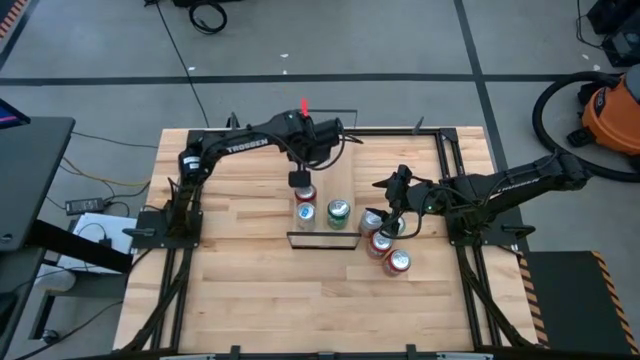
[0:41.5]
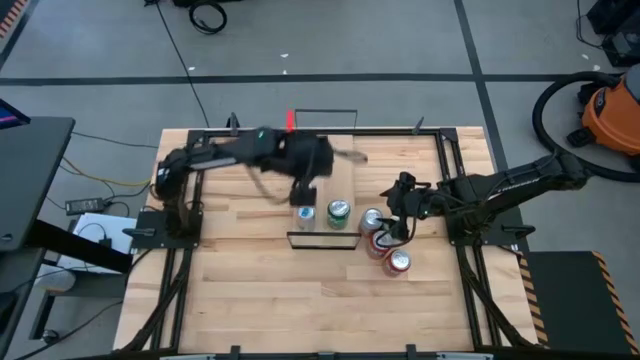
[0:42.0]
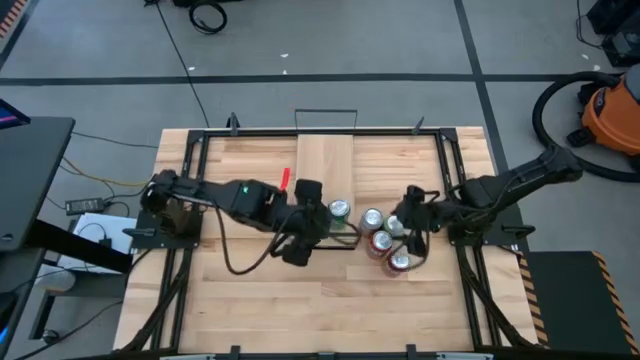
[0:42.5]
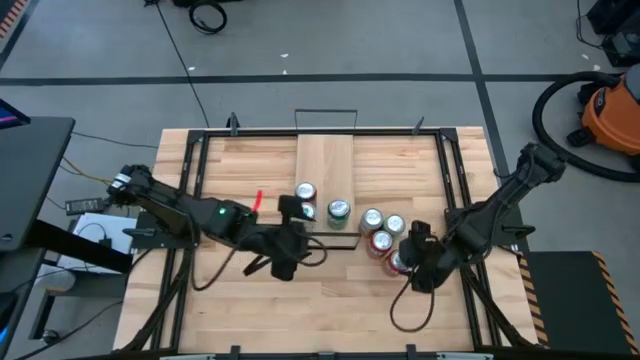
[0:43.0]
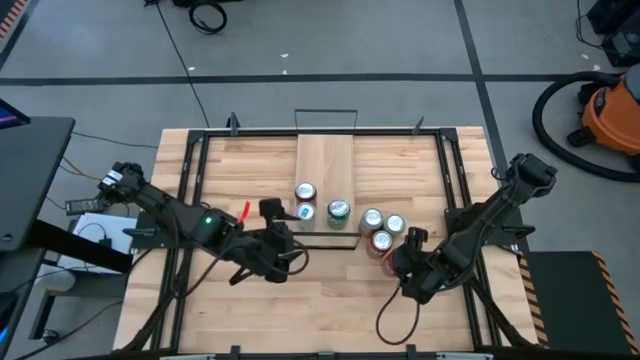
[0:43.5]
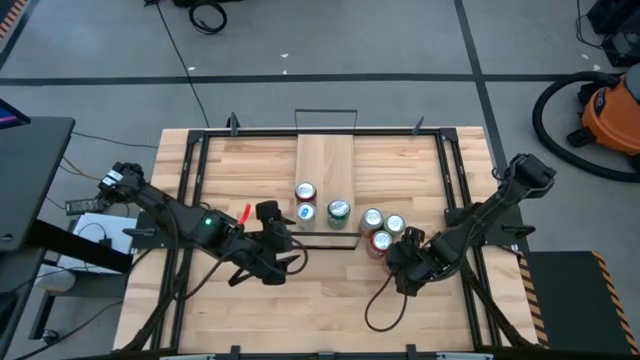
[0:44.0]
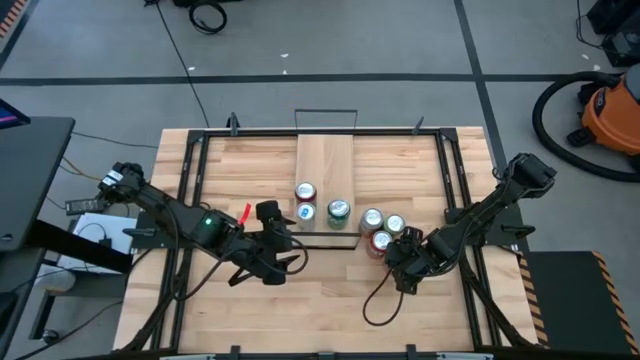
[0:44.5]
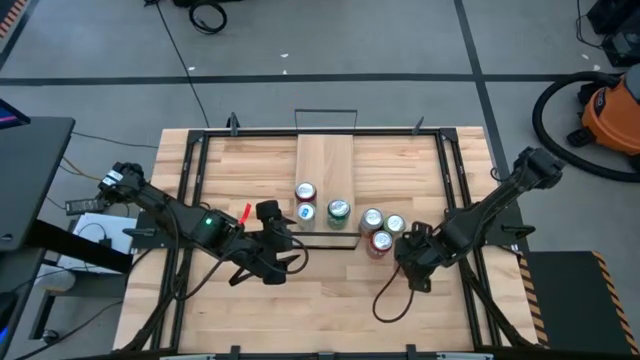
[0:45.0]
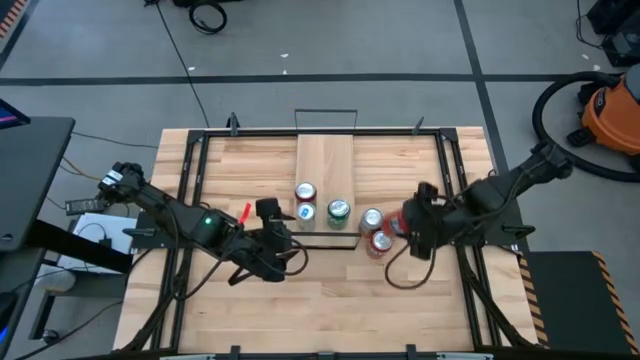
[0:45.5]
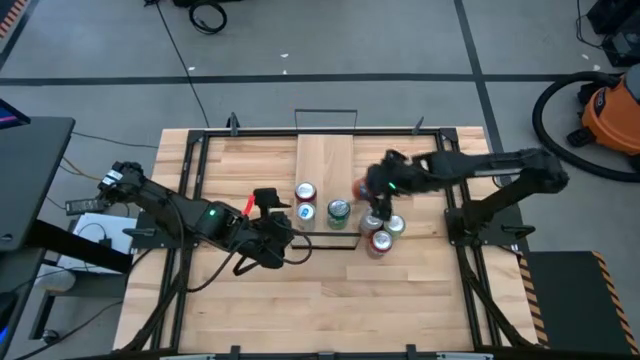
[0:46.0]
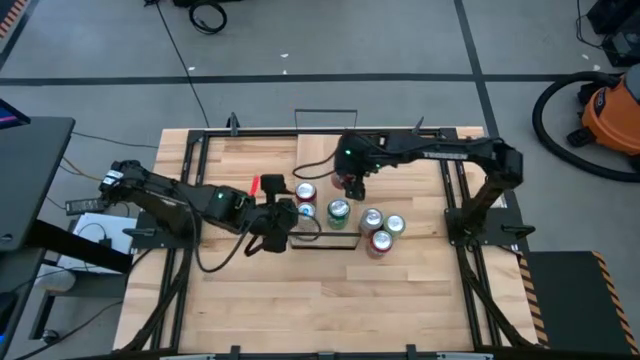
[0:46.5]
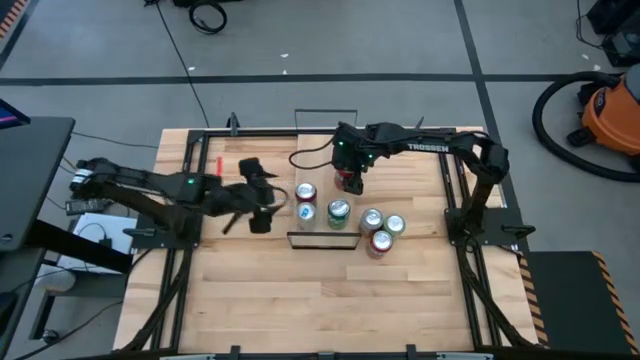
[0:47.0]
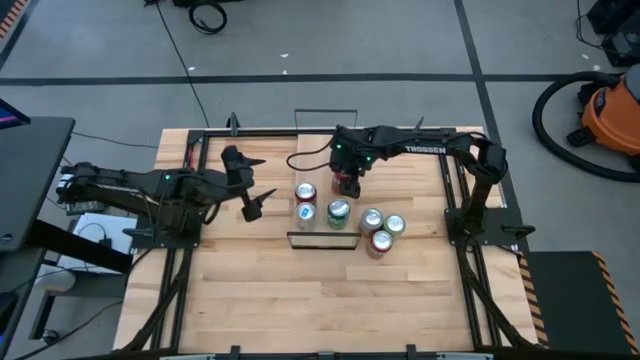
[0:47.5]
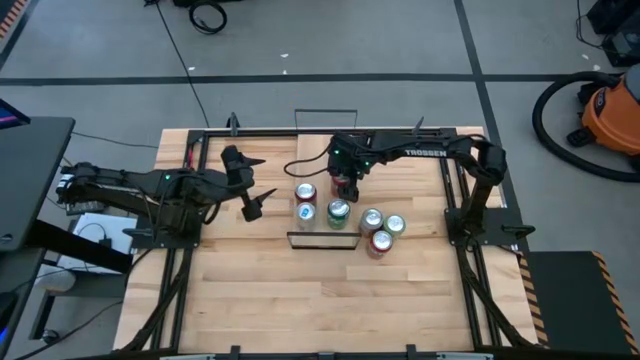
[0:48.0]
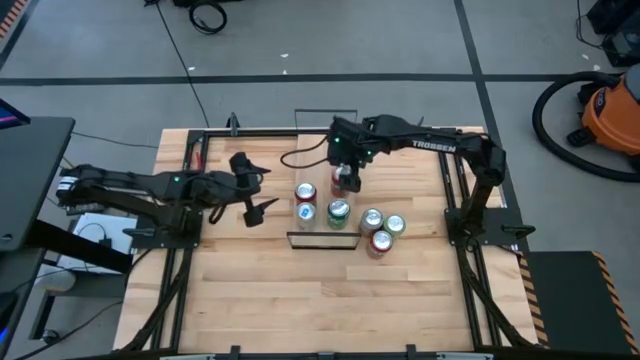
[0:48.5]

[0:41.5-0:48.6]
Task: Place canned beverage on shelf
Put the bottom red soda can on the shelf

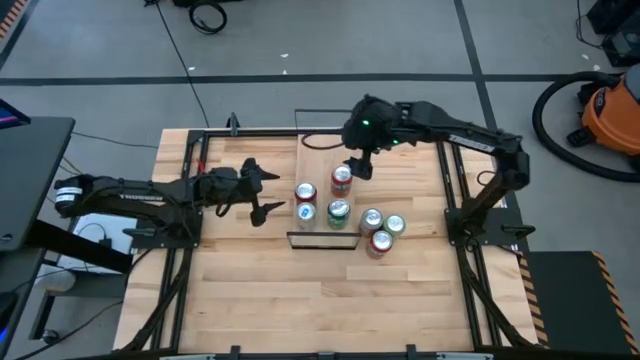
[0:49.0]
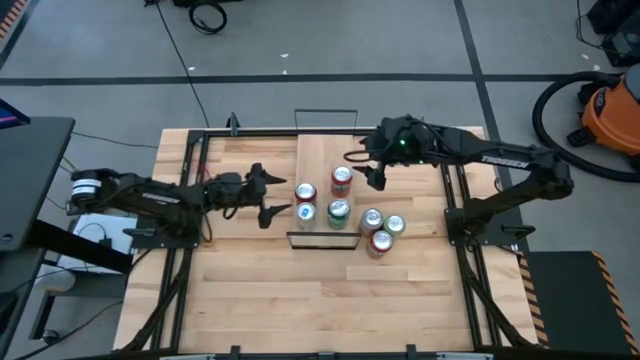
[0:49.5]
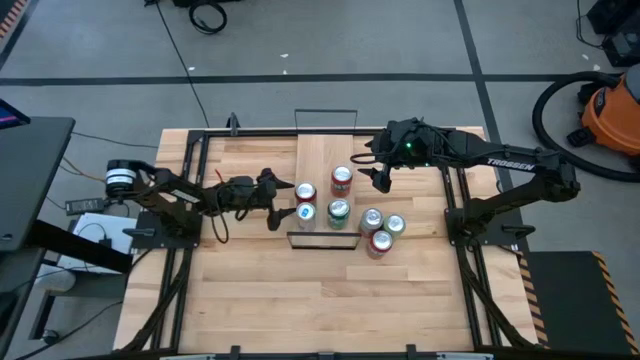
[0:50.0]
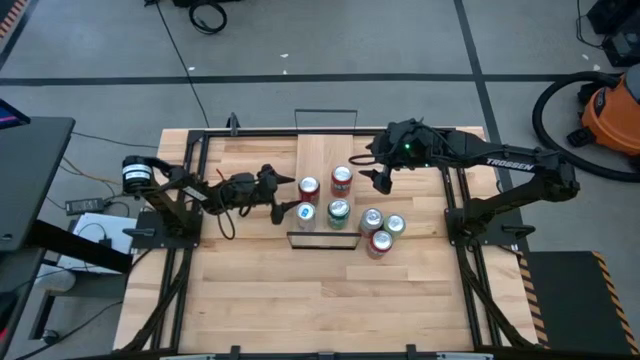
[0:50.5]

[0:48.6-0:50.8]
Adjust the red balck soda can

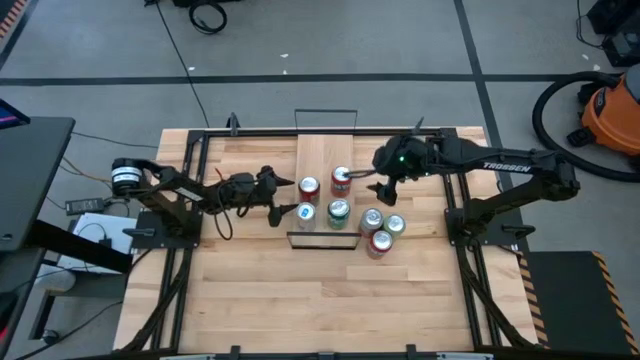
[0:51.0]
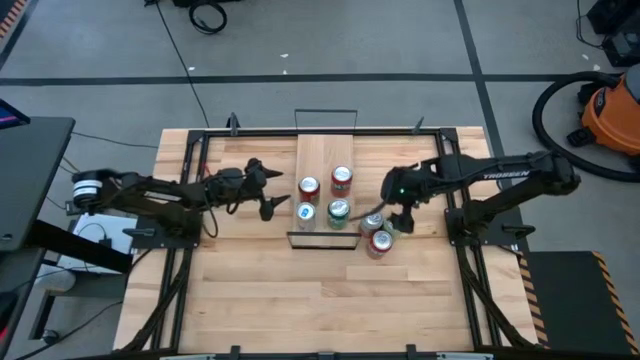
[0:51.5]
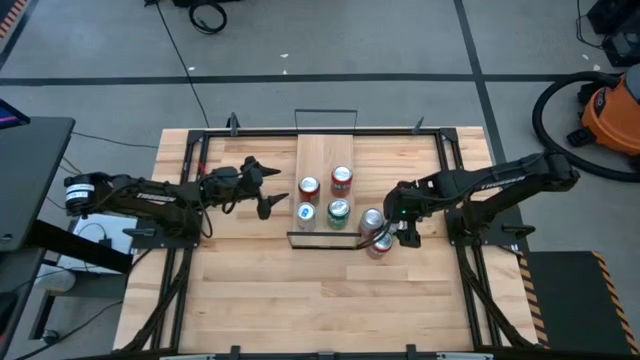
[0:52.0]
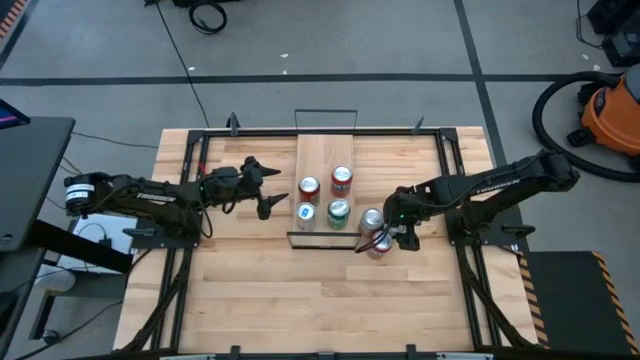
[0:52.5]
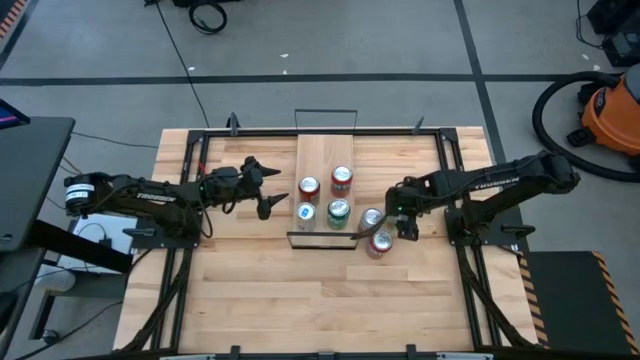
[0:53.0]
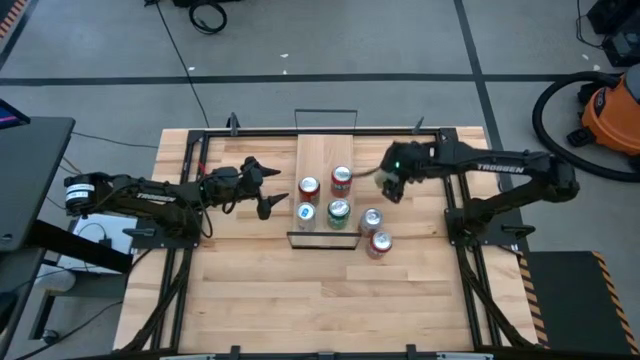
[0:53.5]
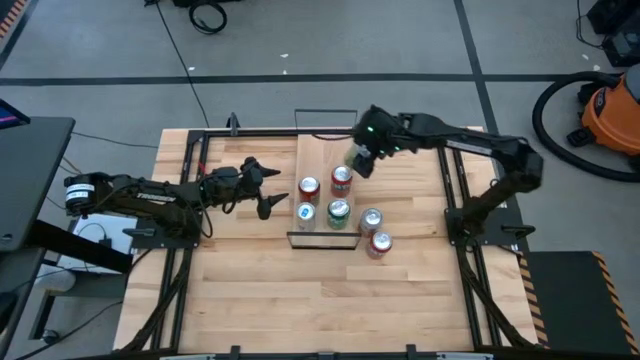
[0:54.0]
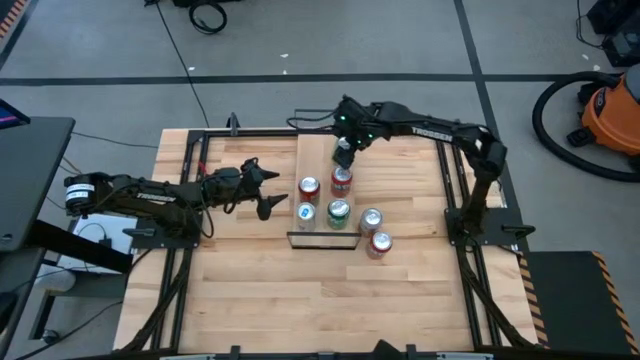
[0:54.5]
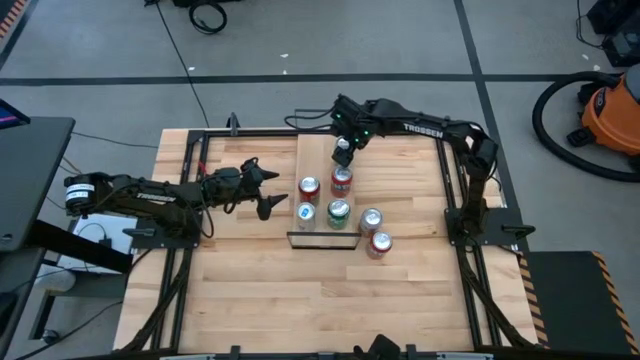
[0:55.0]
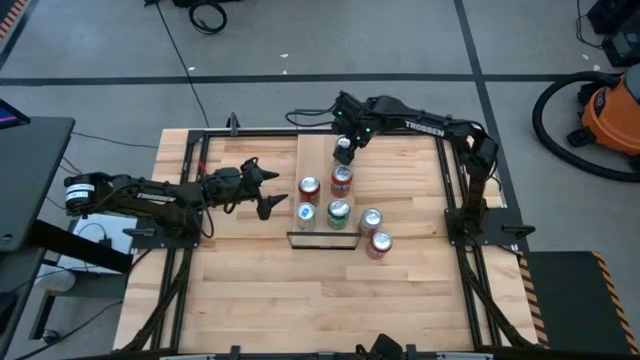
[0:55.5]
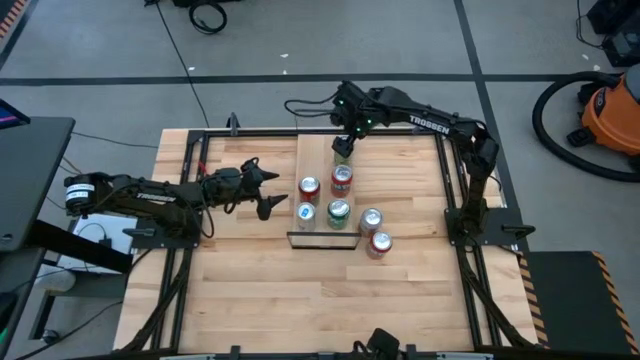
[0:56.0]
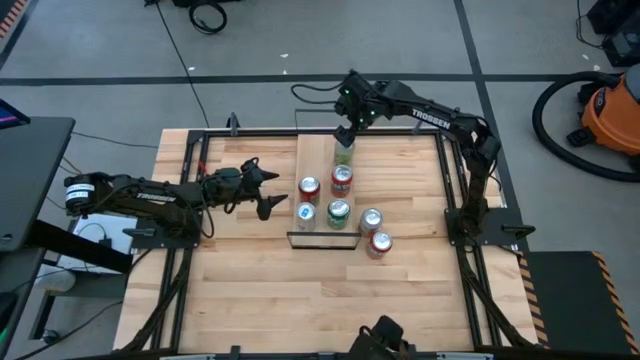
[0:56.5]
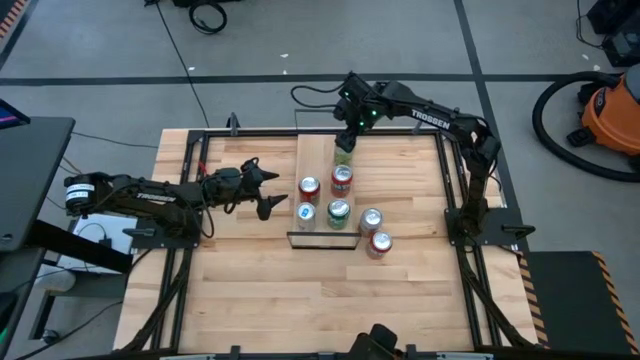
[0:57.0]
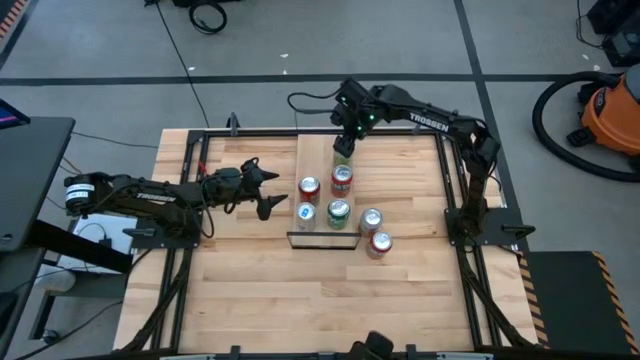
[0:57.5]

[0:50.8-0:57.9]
Put the light green soda can on the shelf

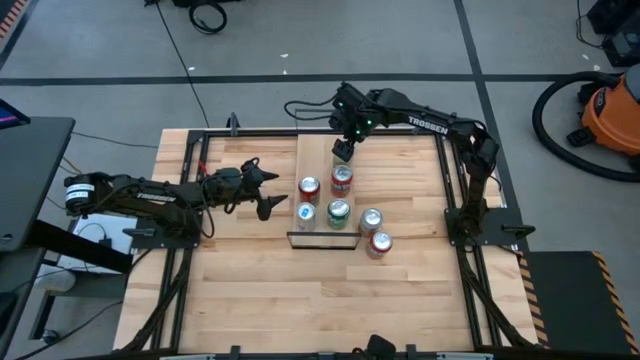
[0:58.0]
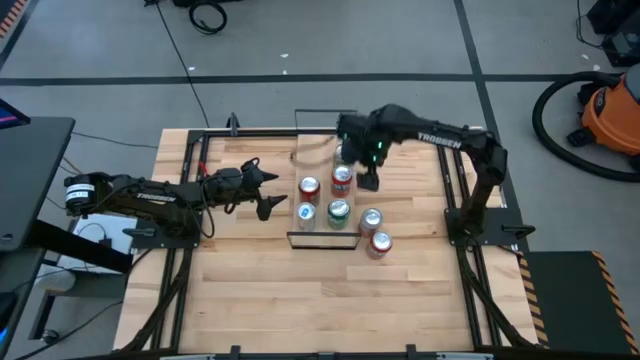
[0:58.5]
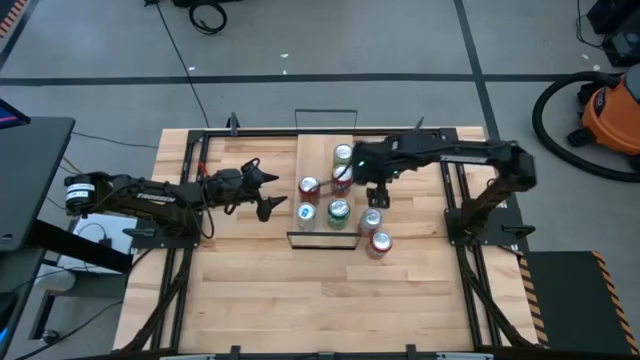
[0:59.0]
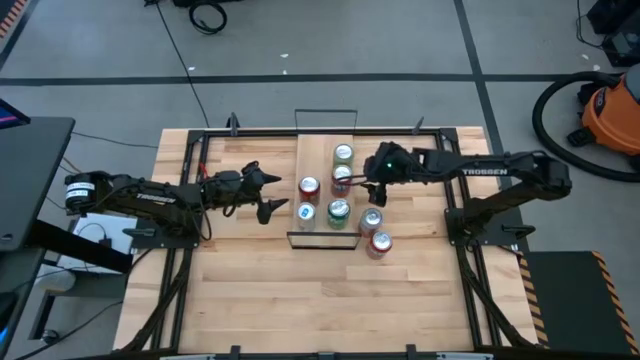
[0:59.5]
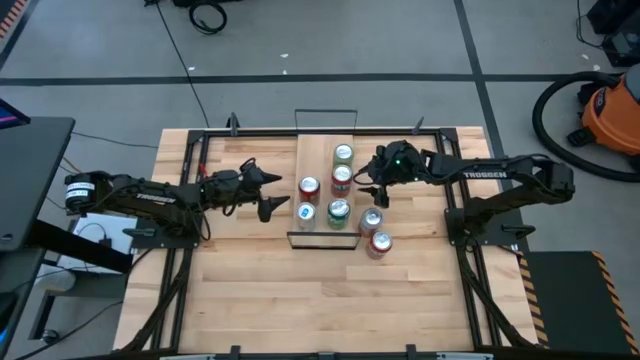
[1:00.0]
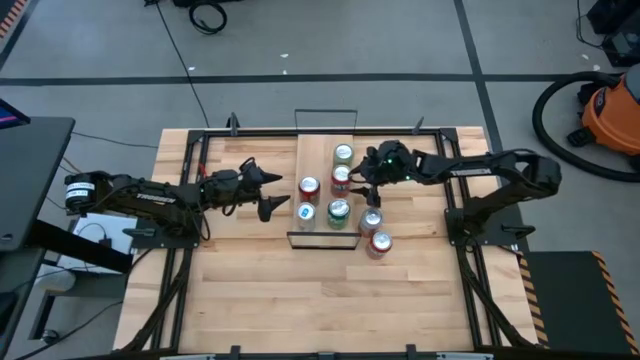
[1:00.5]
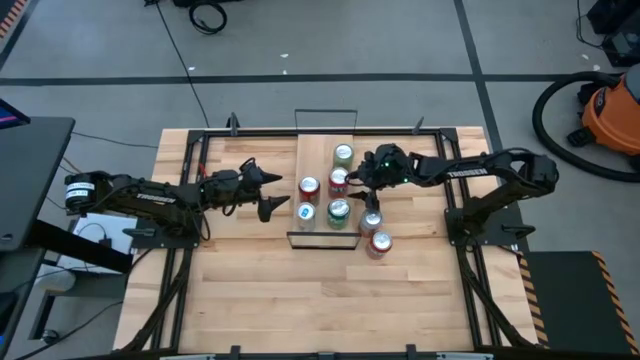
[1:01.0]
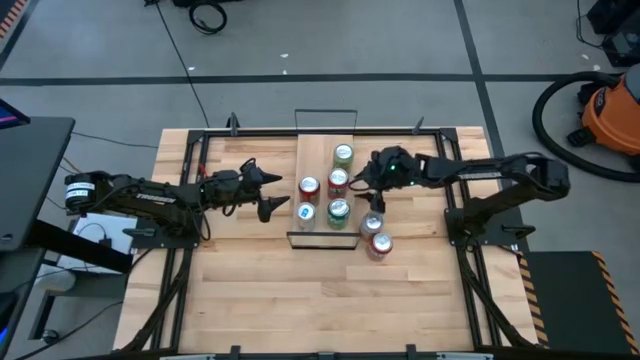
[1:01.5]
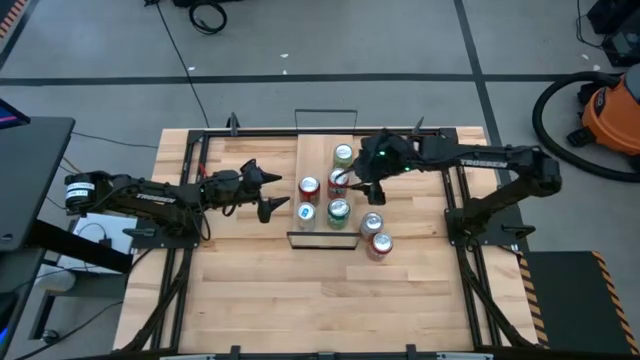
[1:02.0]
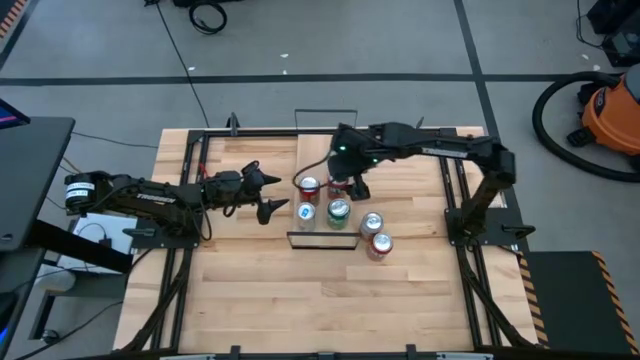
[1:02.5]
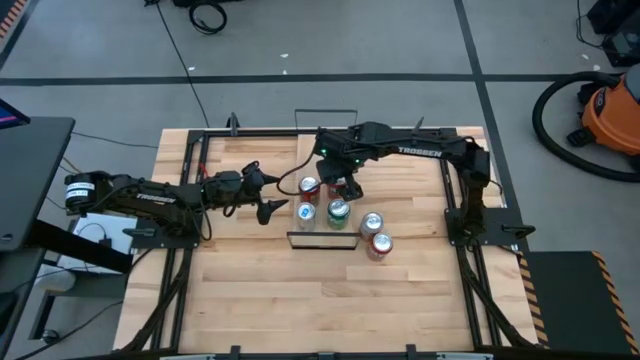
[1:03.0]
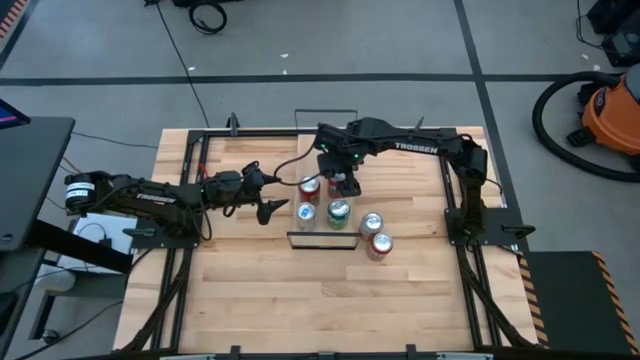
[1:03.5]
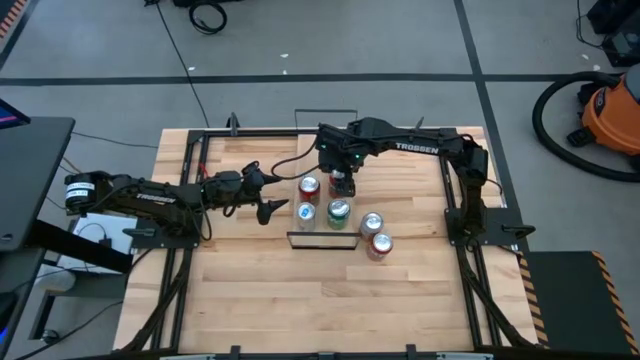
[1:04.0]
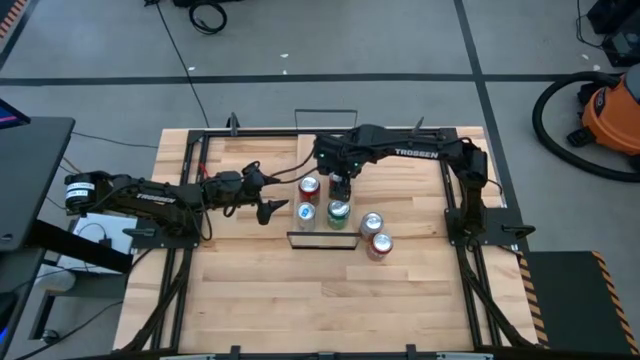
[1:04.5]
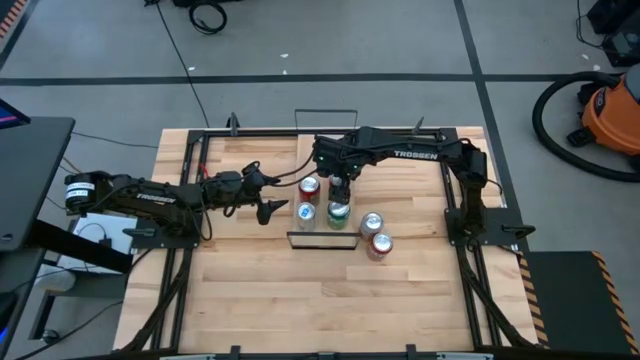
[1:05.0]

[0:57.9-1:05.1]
Adjust the red soda can on the shelf
